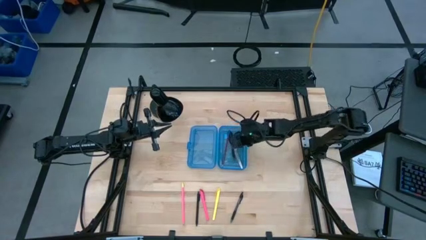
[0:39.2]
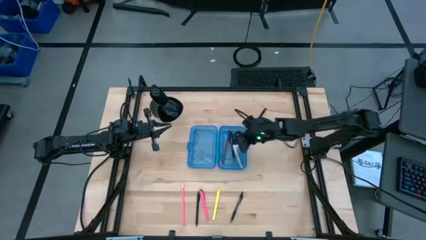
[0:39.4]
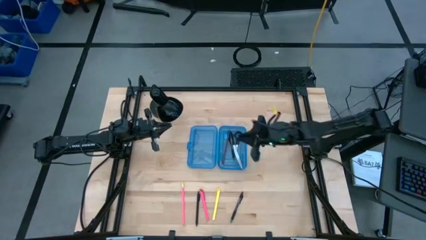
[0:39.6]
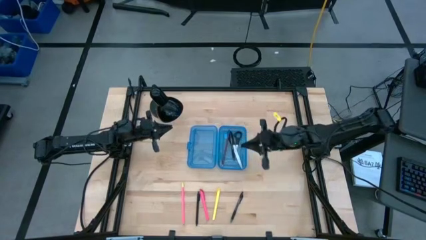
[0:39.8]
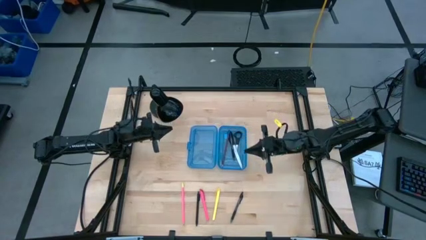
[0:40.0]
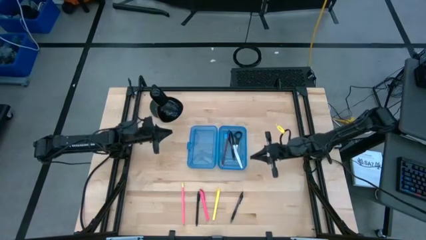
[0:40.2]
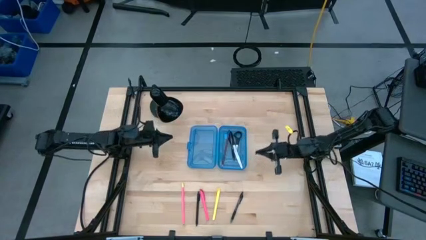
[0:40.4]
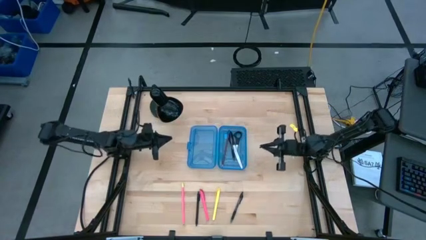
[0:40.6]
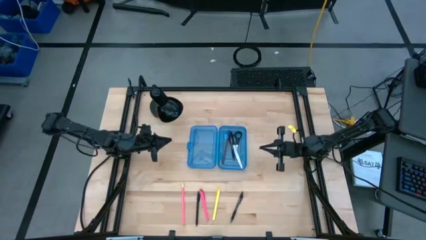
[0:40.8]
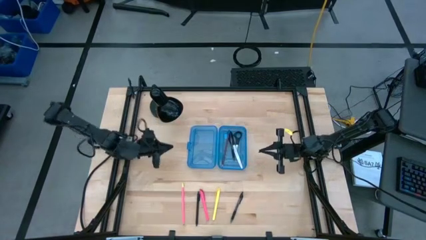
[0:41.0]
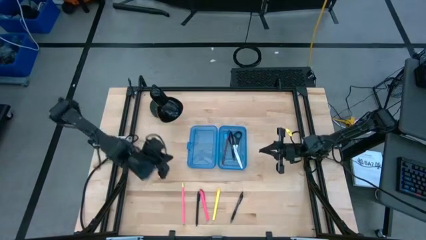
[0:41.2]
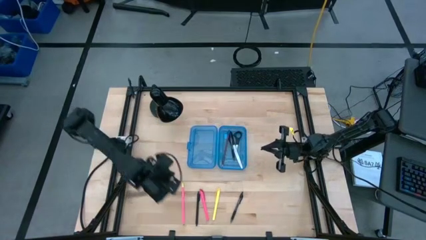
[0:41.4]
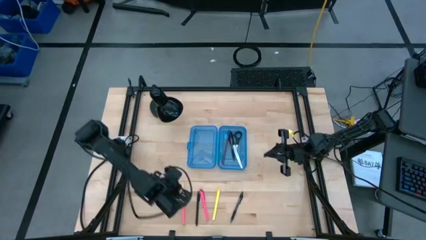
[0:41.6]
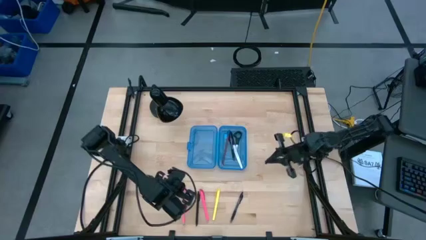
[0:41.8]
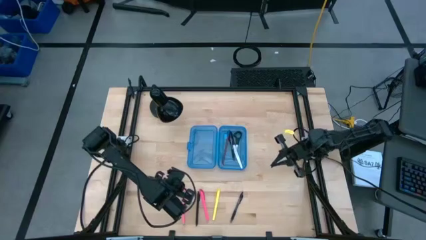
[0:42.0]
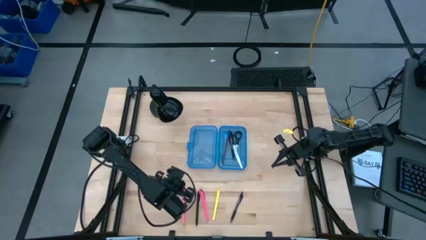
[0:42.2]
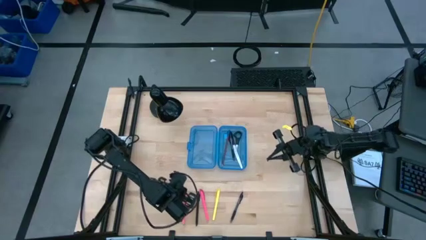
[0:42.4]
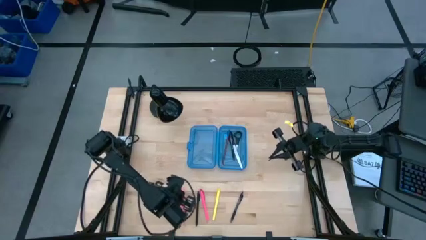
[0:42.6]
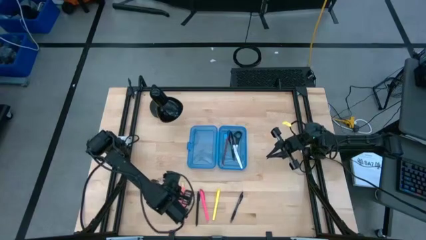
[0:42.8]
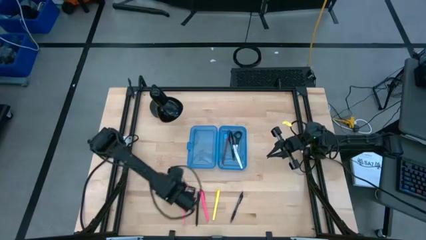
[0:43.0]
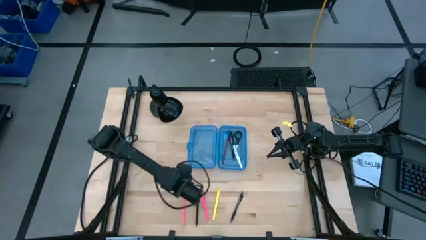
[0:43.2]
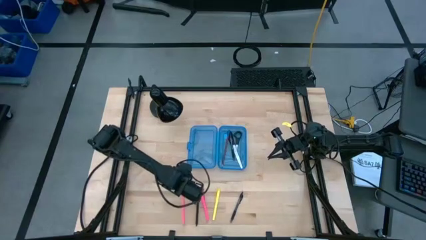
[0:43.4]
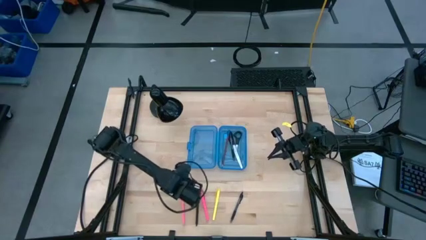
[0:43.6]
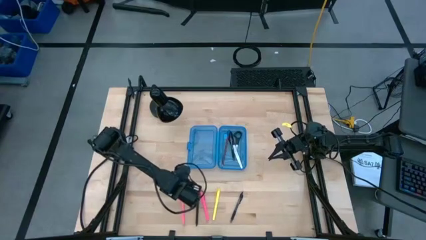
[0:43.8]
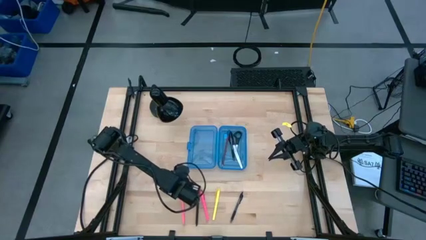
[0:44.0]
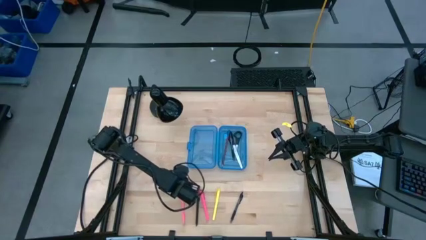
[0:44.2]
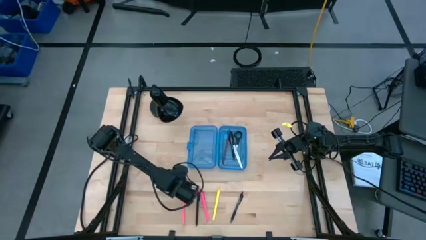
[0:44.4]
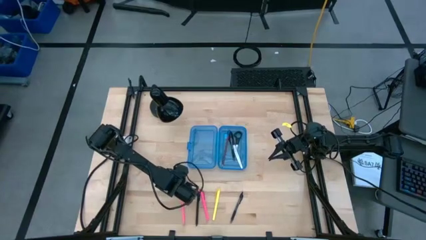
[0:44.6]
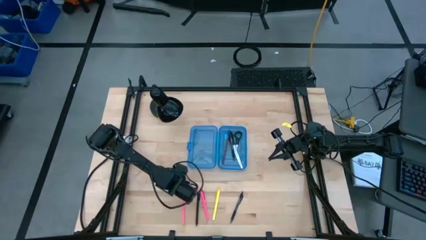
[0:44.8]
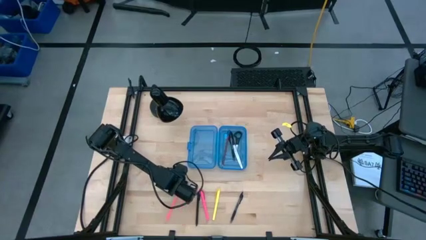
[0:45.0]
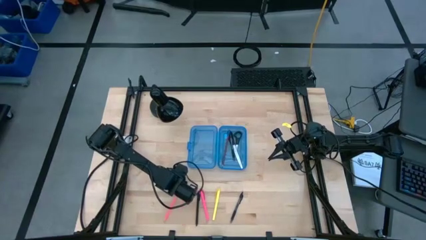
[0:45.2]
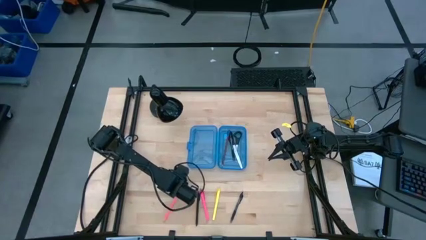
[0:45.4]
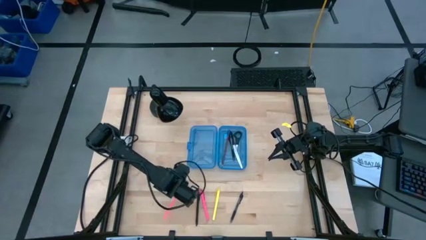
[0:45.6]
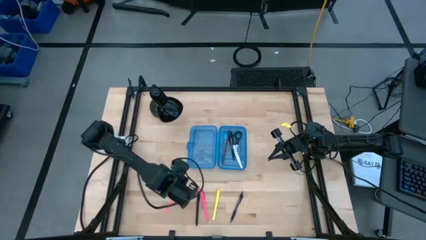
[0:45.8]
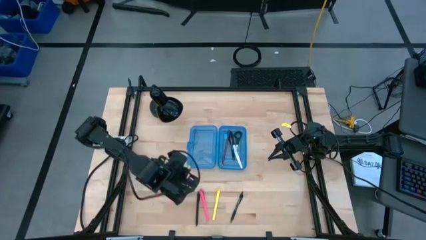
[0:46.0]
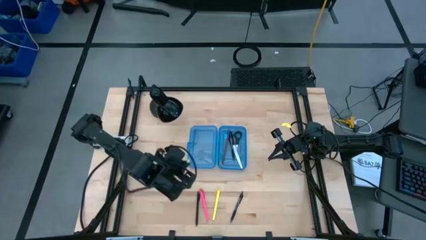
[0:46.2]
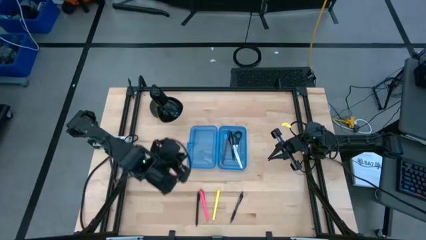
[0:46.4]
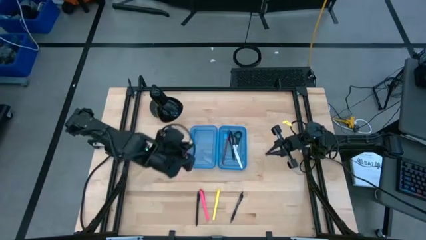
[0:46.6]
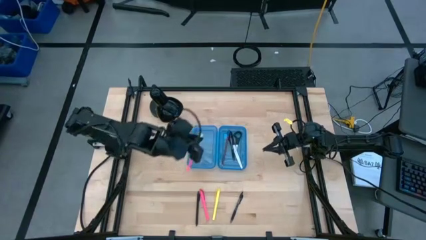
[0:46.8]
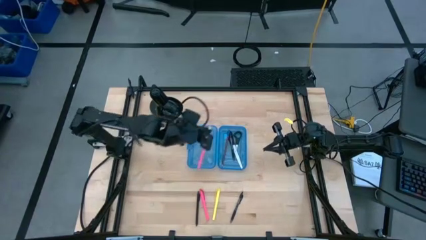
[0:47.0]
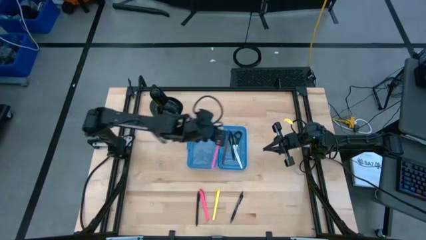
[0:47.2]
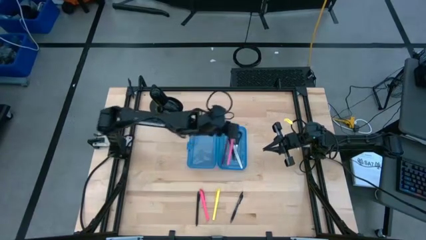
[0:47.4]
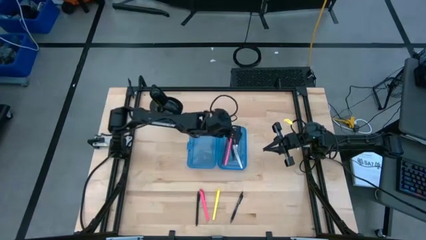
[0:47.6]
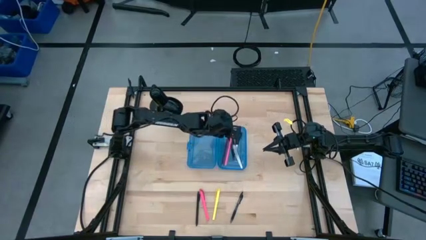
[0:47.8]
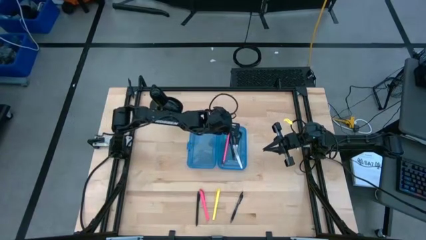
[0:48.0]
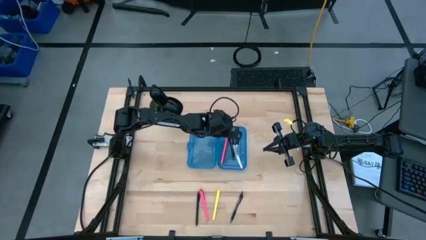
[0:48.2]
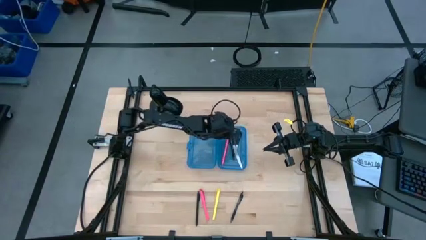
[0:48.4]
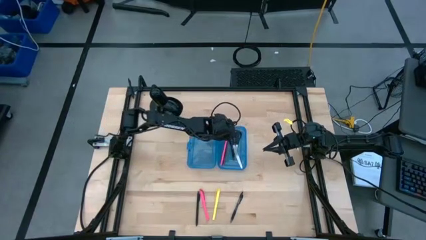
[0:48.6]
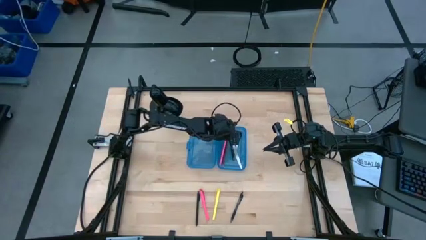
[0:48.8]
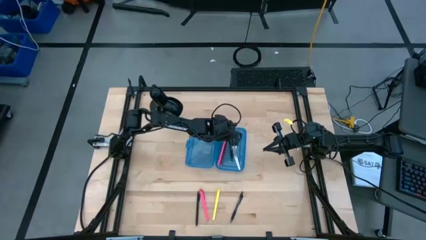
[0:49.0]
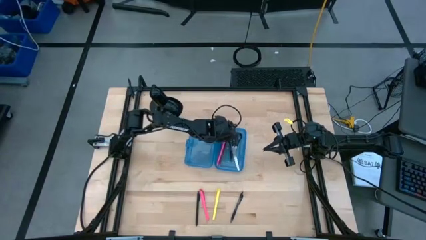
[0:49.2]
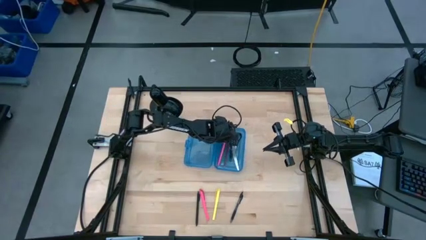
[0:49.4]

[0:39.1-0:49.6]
Task: Pick & place school supplies into a supply box
Put the pink pencil into the supply box

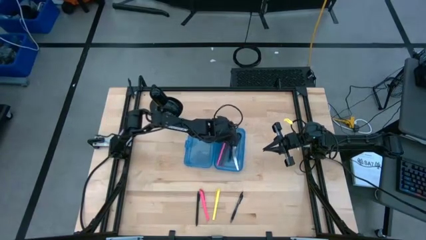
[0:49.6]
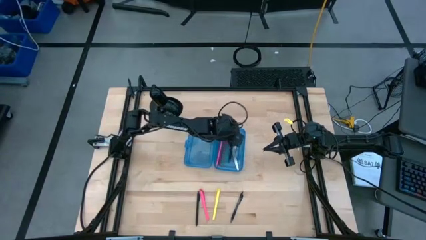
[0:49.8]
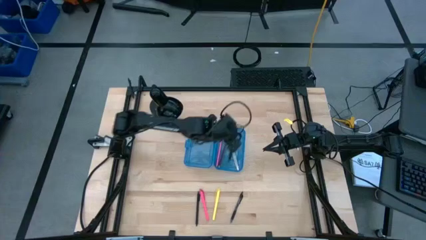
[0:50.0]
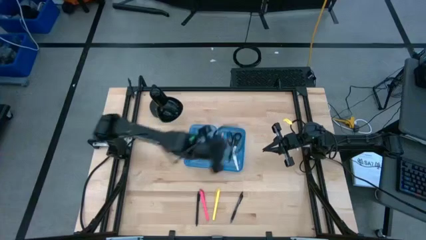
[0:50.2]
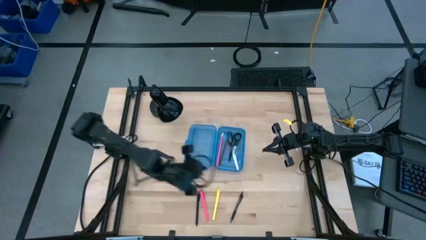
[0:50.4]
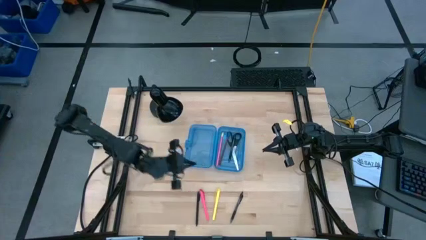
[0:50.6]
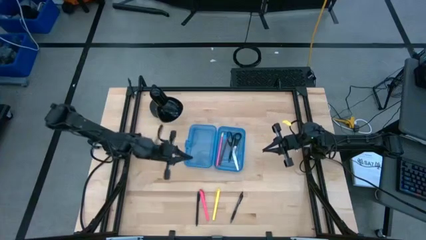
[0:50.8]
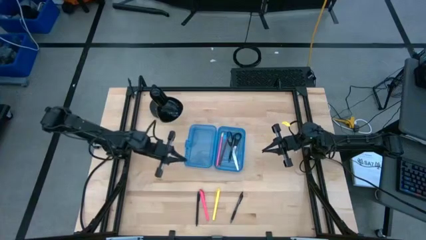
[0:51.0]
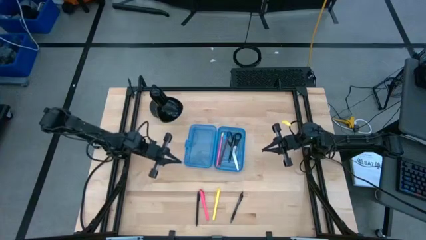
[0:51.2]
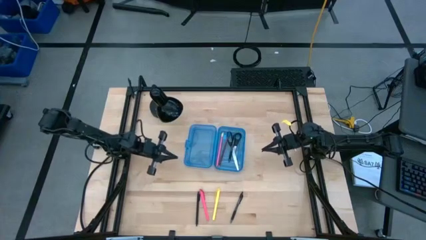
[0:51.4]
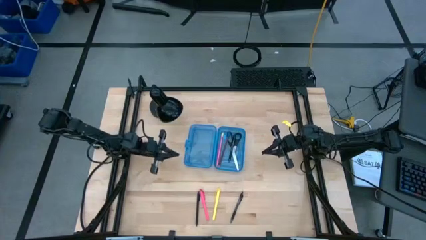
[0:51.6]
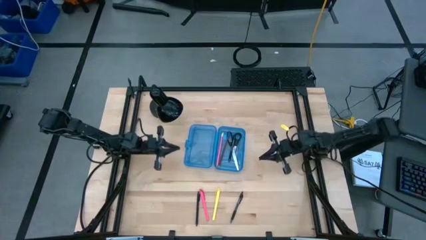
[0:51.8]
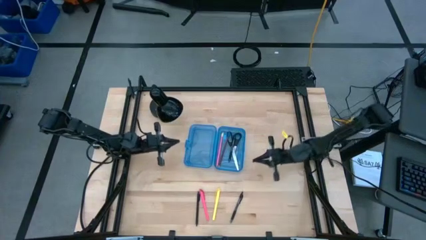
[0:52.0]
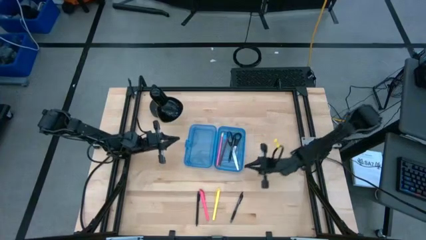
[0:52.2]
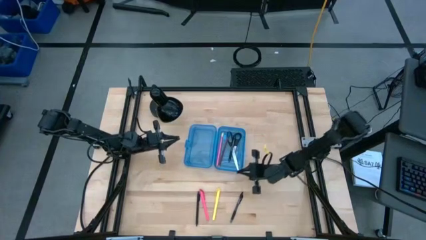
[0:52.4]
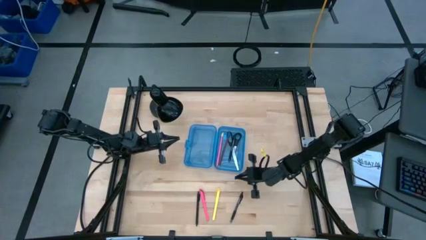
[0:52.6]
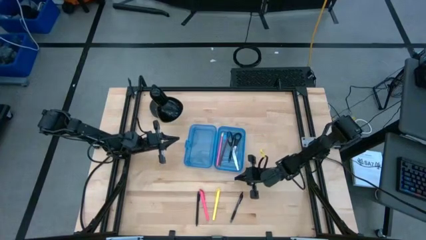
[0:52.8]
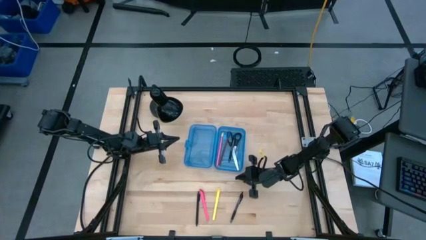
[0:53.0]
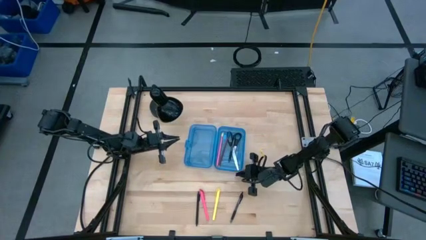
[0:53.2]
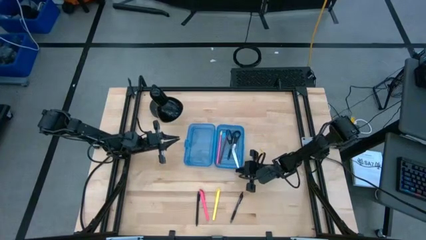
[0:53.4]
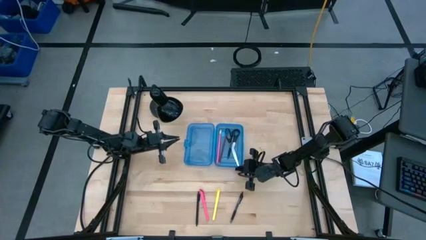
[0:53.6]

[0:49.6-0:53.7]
Adjust the supply box

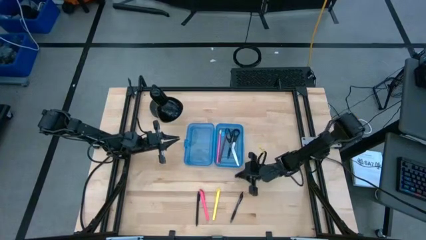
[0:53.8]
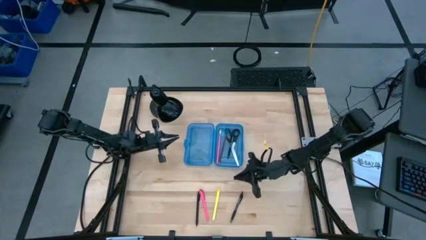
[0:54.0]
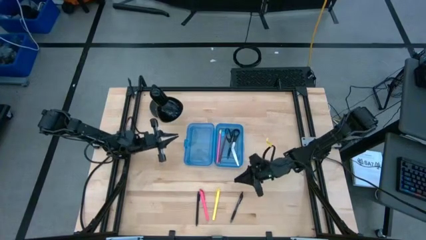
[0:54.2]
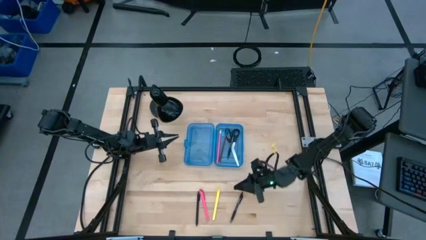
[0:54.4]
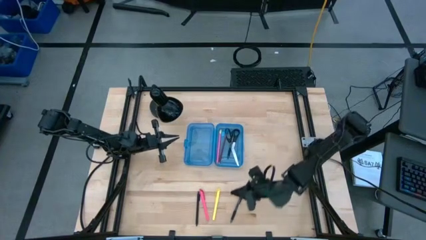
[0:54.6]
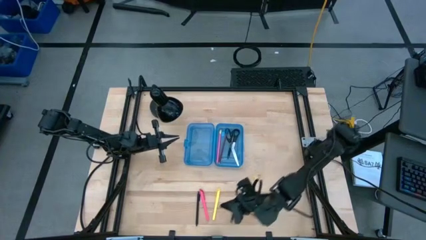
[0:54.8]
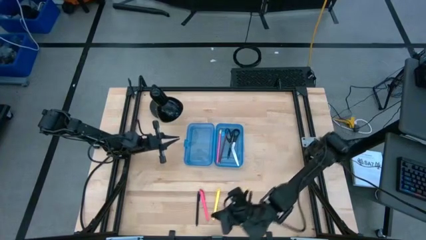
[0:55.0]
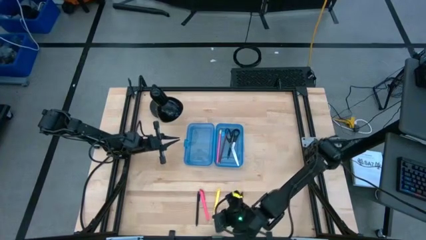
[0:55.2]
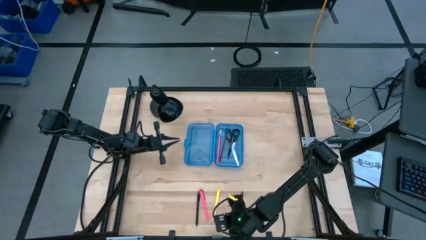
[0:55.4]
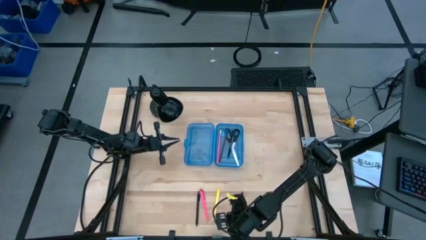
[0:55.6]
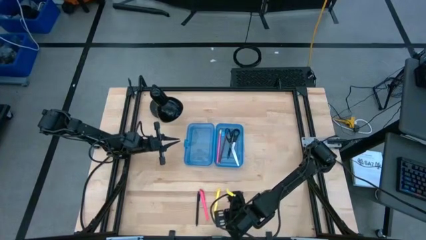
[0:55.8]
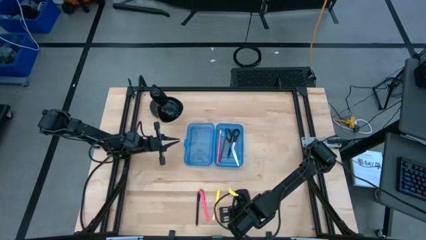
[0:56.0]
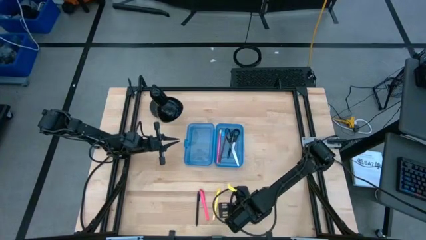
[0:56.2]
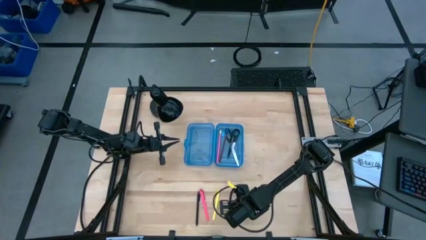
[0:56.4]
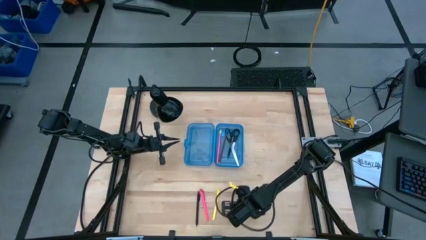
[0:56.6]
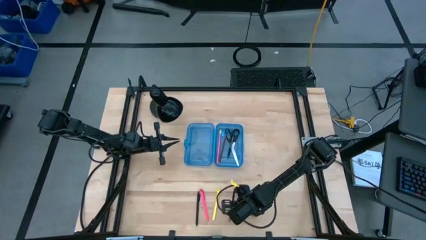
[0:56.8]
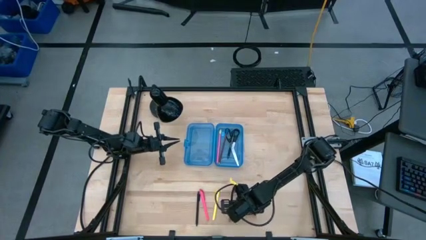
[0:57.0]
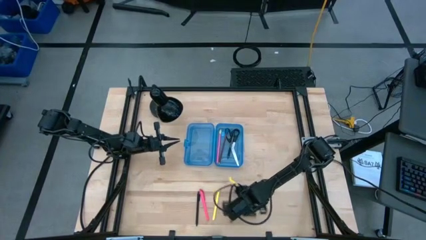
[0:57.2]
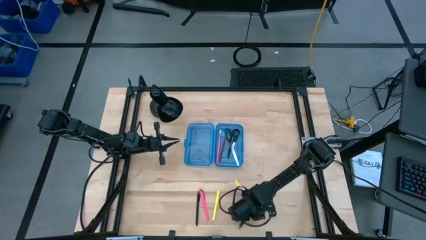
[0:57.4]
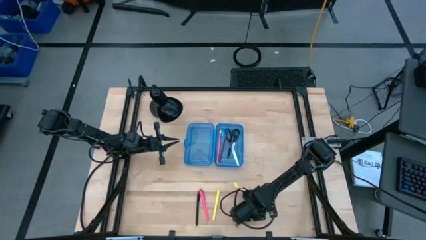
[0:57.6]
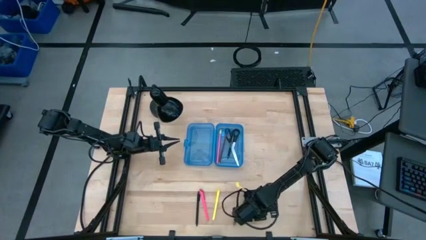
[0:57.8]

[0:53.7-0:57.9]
Put the right black pen into the supply box
